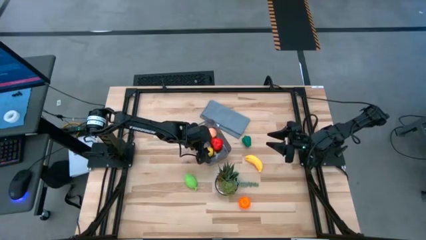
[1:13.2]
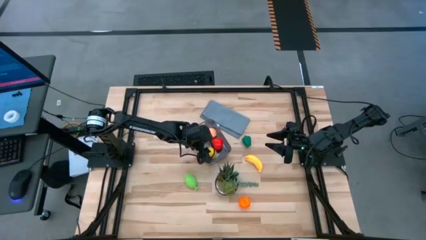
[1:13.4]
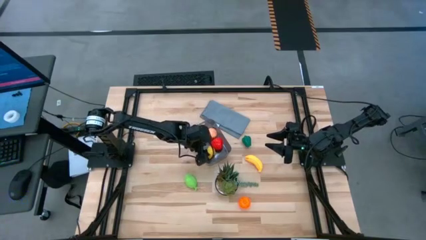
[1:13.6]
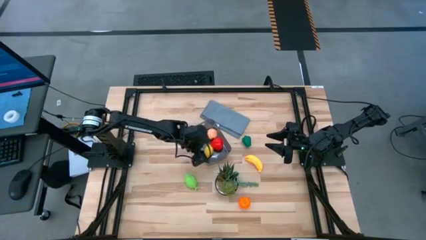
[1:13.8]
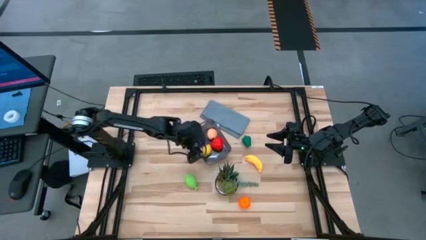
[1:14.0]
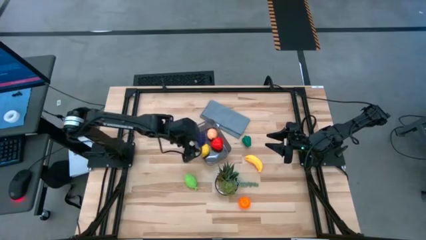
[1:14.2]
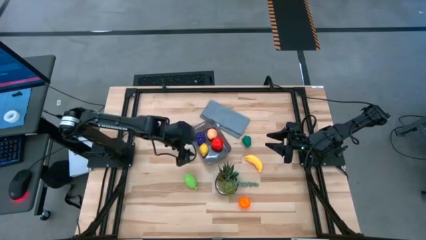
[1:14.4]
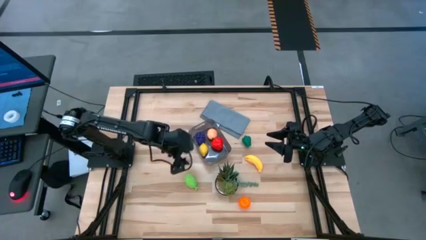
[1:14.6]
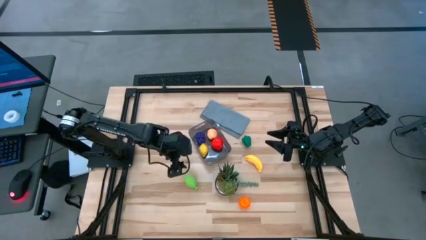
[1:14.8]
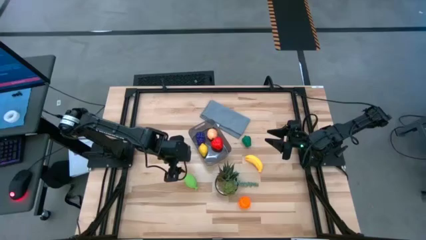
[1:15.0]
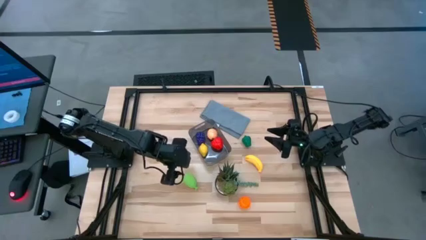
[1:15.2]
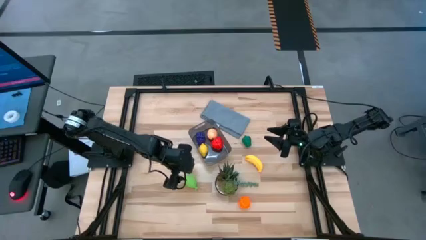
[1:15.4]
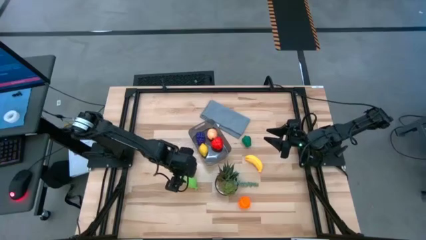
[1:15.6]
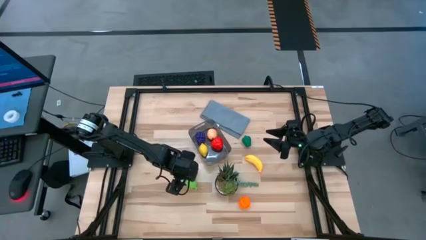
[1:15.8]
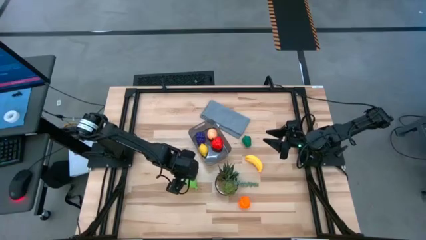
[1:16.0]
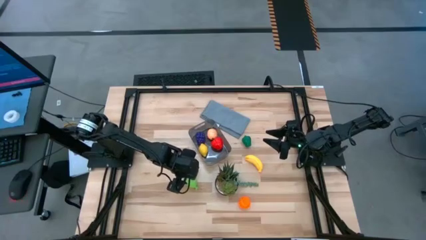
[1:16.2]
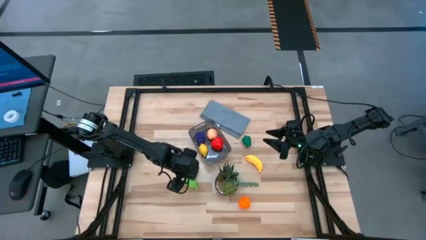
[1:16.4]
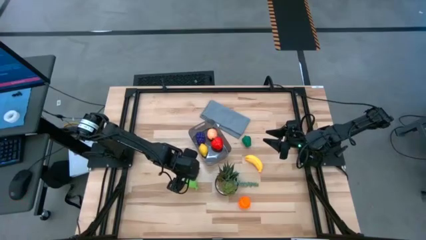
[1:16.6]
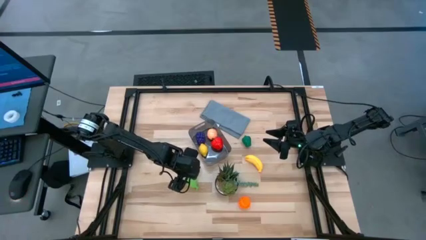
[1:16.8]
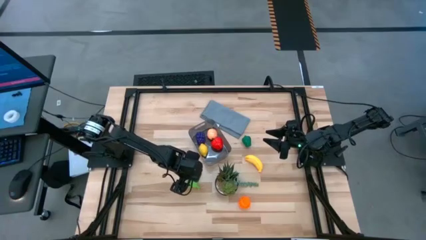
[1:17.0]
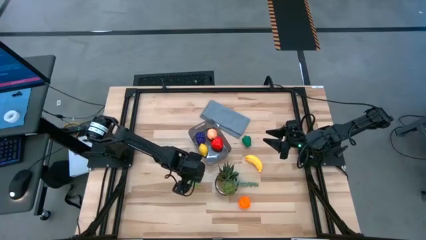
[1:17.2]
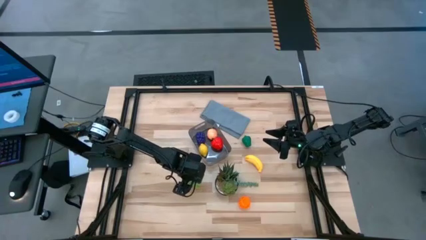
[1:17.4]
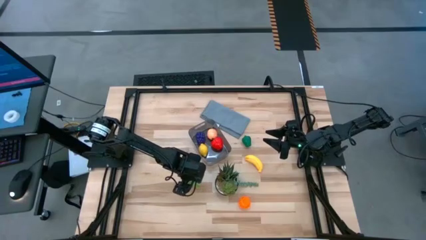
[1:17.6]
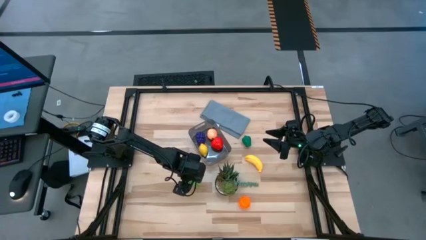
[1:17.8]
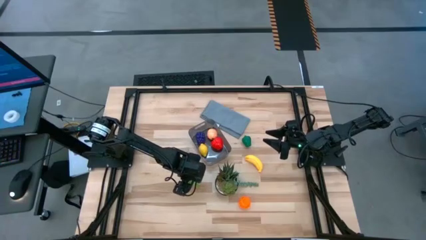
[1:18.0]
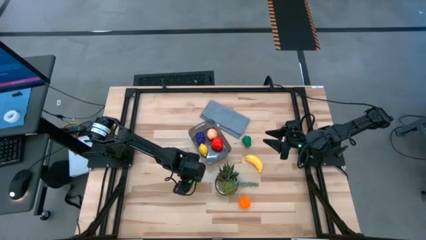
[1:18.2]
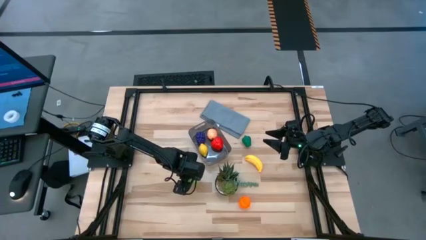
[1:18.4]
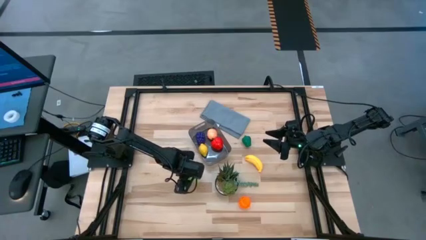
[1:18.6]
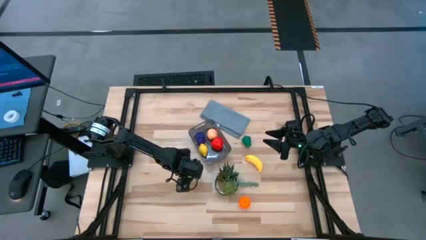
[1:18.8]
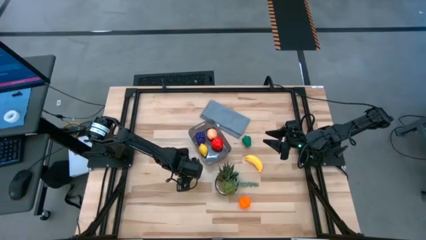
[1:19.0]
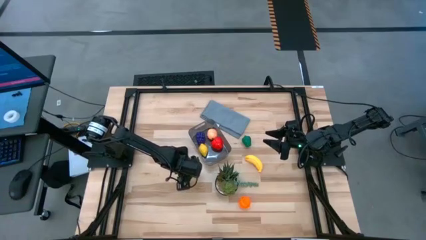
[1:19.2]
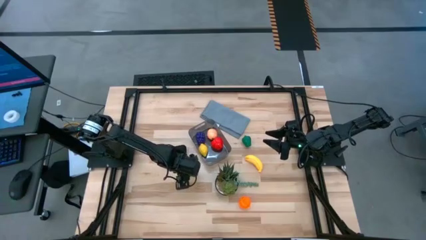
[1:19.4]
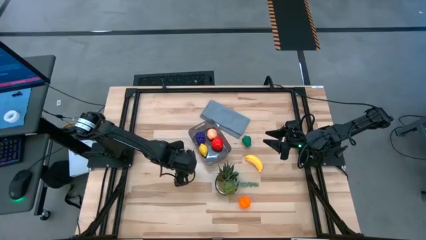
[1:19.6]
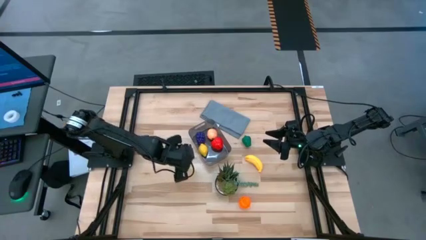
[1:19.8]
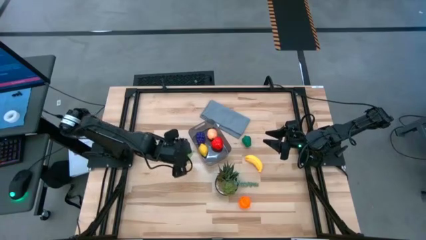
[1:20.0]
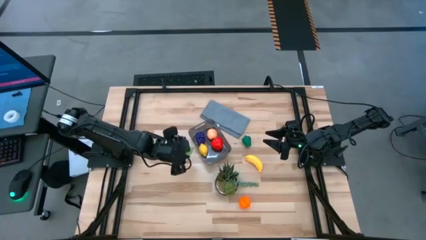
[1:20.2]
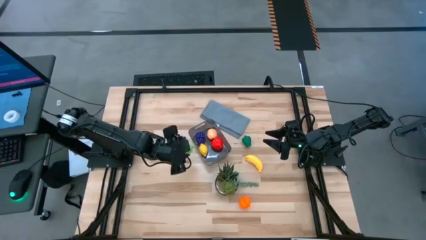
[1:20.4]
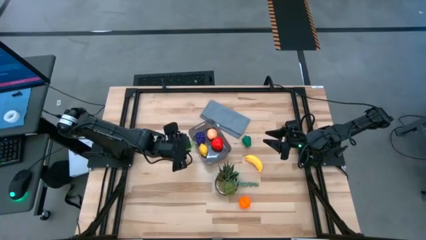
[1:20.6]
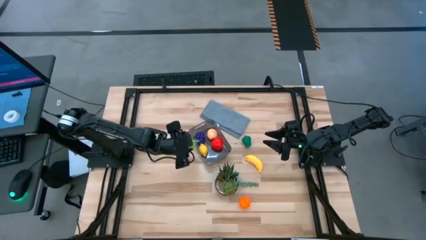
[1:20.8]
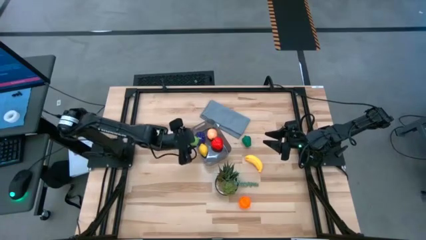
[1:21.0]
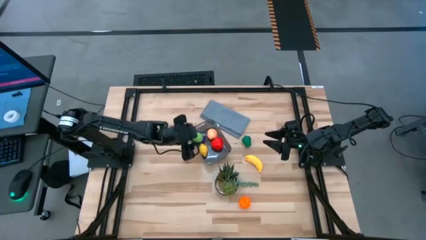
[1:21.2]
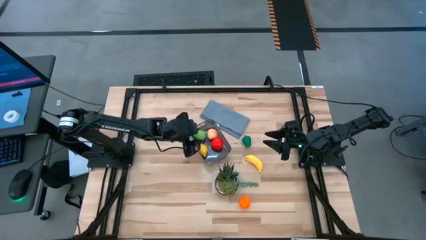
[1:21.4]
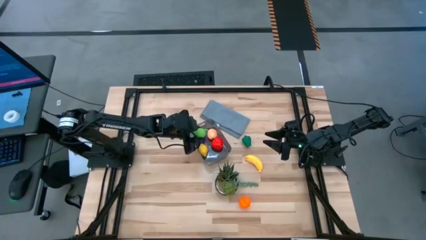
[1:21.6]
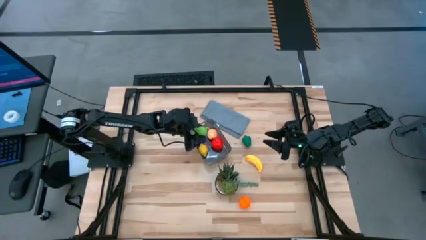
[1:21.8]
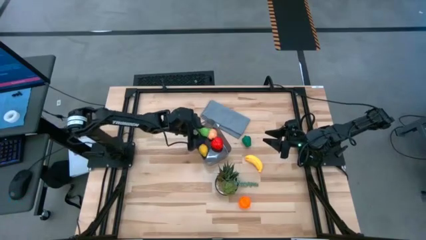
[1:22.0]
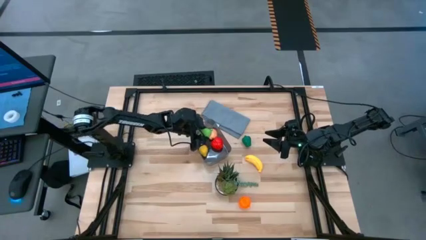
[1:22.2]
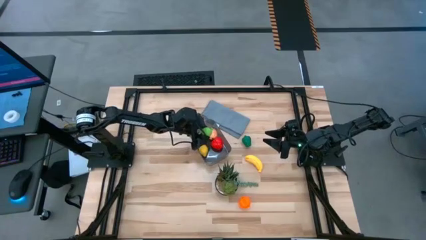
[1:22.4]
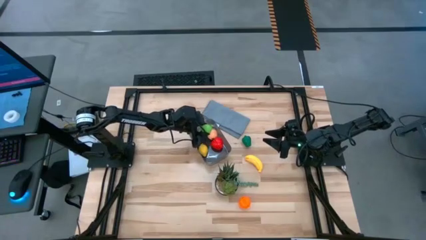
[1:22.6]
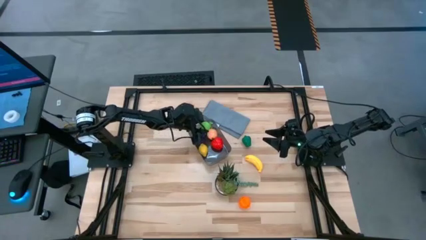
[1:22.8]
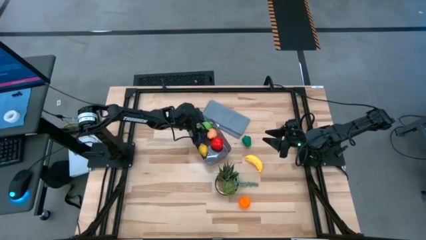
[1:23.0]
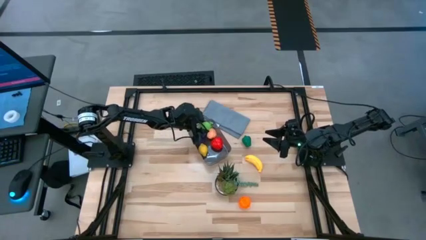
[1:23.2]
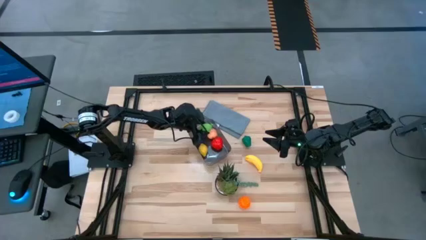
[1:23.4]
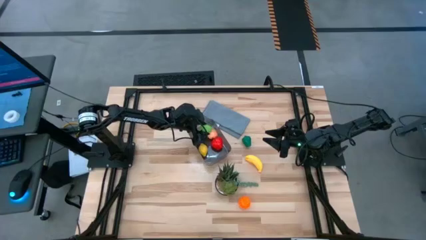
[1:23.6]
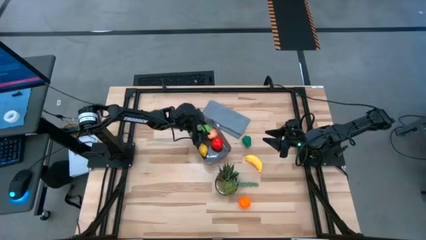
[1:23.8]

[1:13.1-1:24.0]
Task: Pick and placing Produce into tupperware
Put the green lime into the black bin

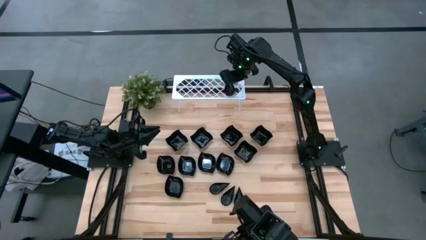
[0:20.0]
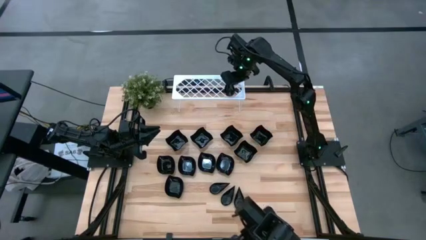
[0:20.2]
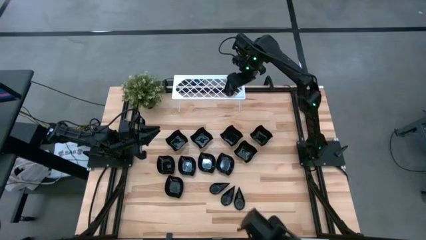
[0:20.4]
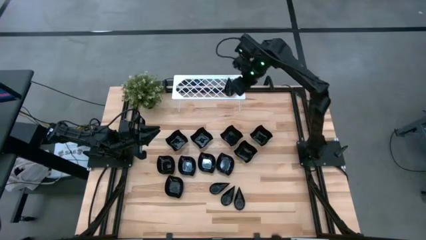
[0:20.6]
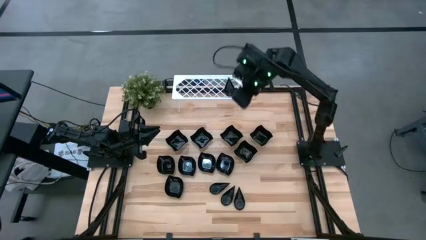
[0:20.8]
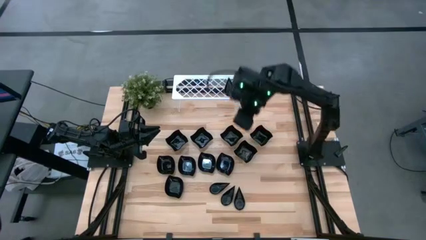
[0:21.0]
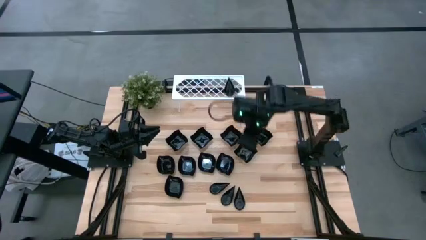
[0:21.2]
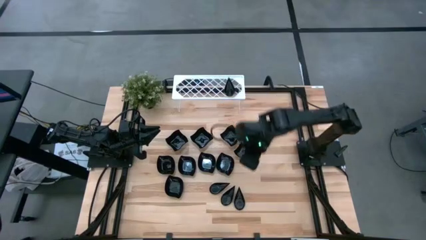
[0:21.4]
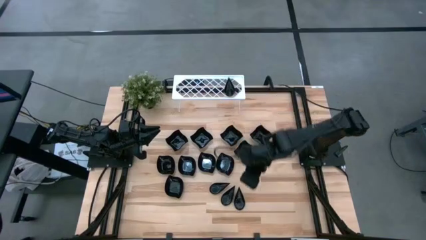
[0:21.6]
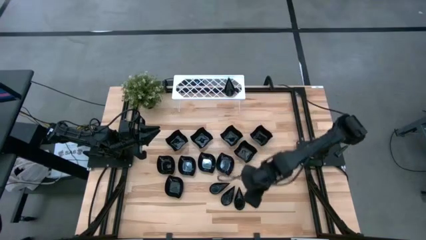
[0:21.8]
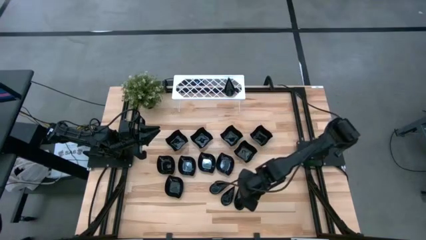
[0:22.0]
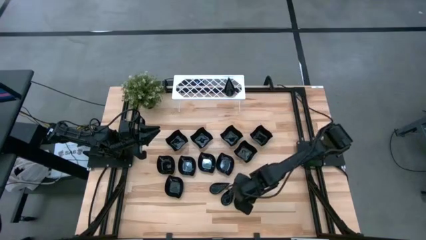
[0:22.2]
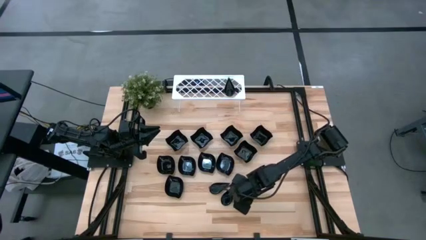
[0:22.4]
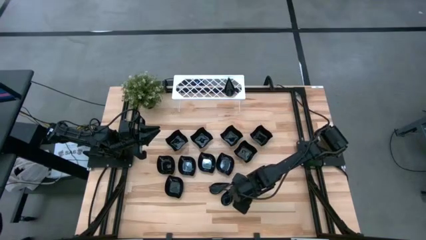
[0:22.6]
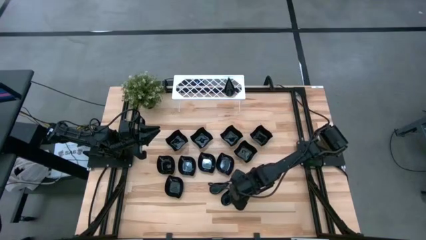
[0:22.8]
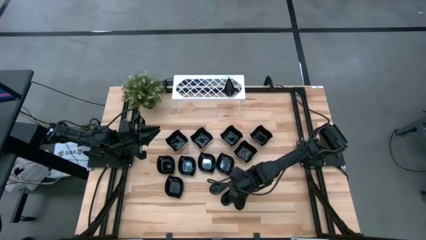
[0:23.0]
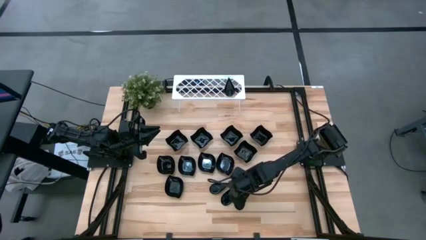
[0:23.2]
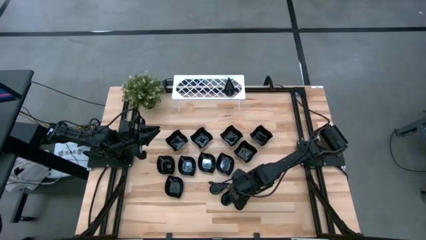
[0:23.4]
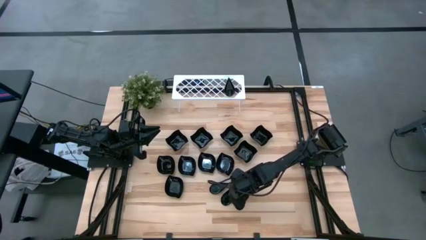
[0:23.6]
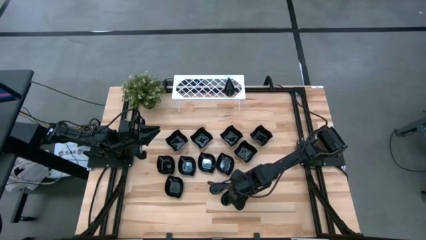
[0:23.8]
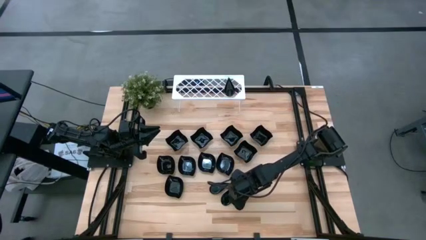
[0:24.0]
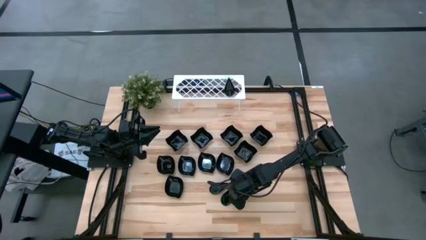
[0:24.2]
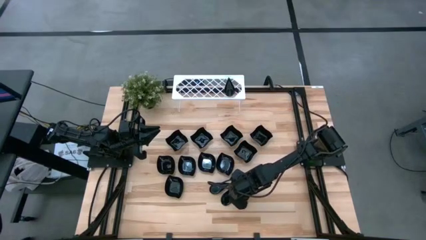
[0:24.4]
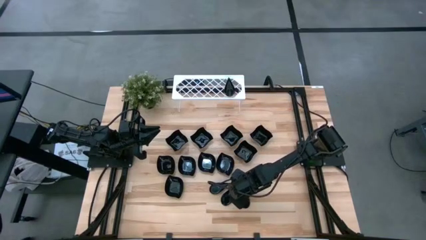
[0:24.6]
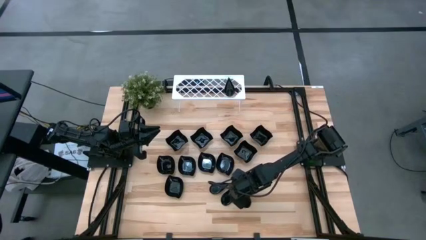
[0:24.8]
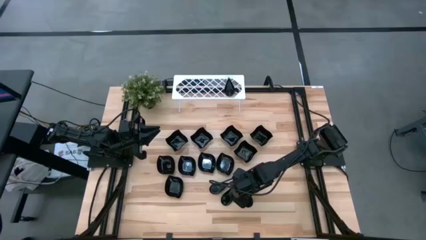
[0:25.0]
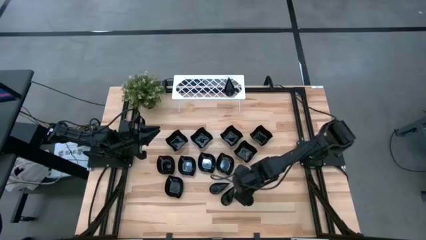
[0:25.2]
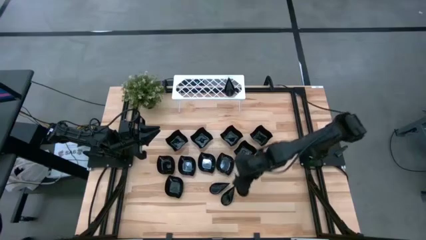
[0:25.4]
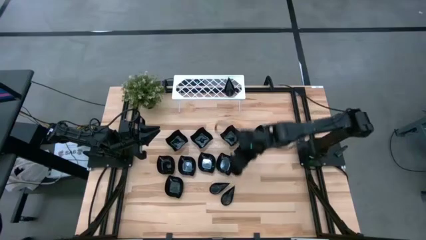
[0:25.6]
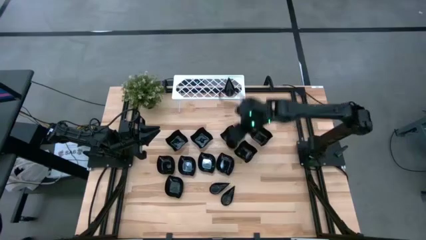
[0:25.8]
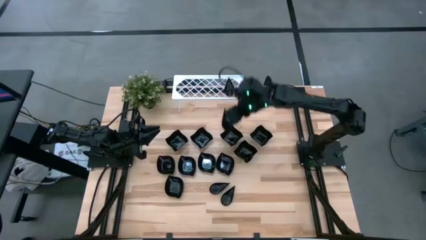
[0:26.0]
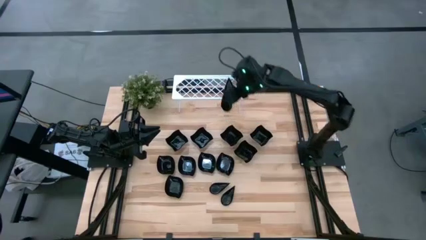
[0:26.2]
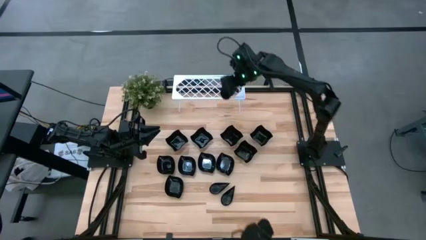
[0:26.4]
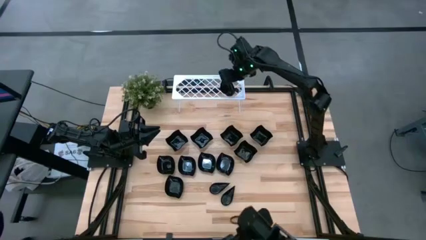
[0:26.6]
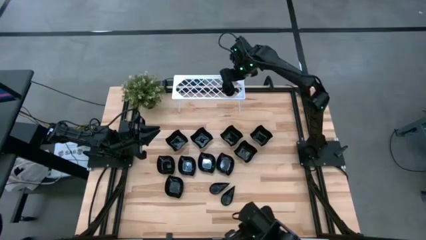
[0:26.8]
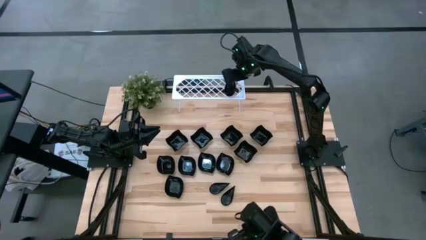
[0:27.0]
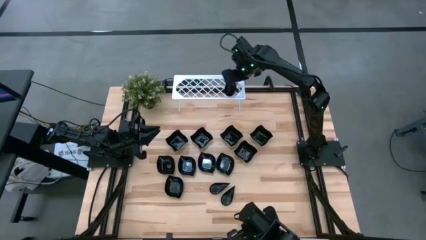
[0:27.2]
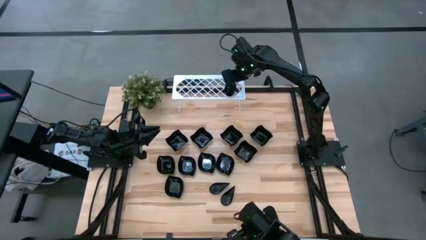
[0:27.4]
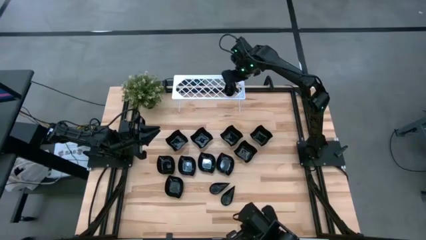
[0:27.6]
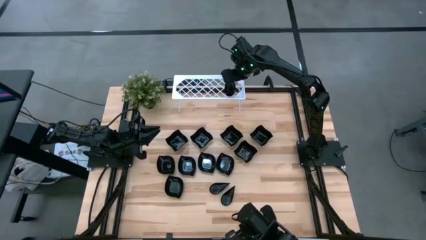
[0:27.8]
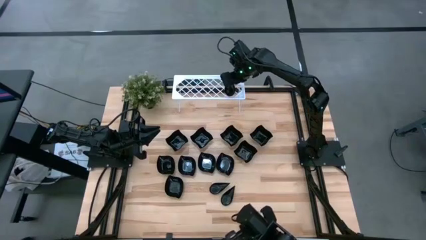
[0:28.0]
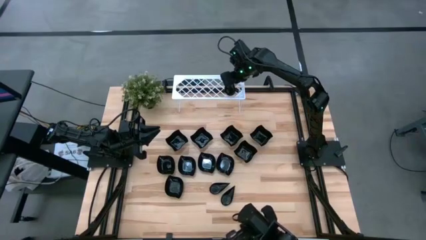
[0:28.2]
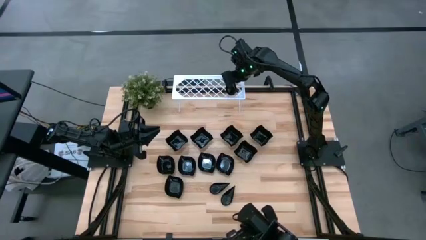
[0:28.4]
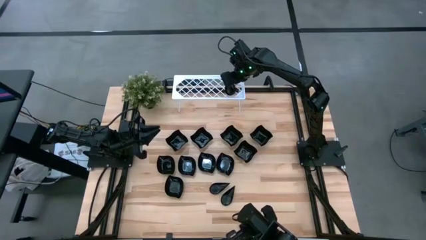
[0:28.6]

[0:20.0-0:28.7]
Task: Pick & Place Mini shaped plates
Stack the drop-shaped plate on top of the drop-shaped plate on the shelf
